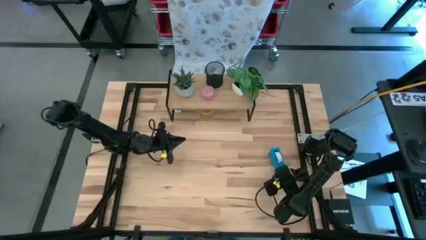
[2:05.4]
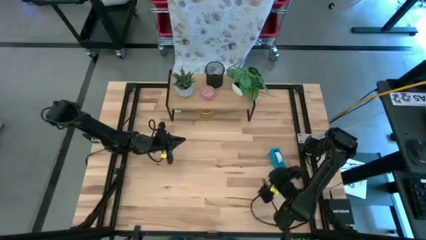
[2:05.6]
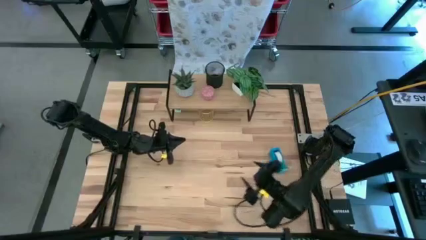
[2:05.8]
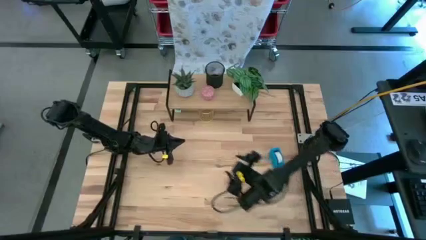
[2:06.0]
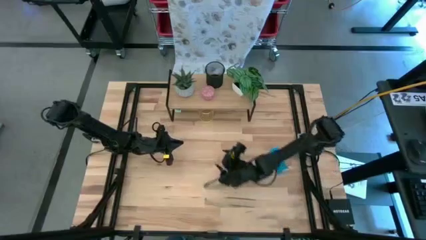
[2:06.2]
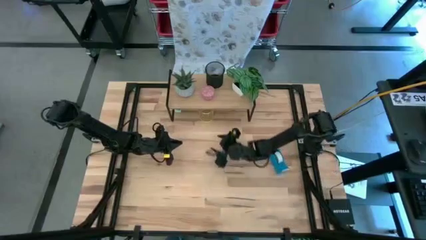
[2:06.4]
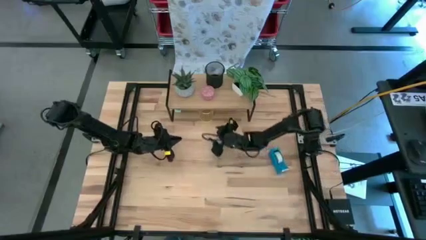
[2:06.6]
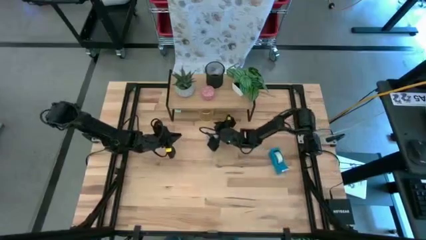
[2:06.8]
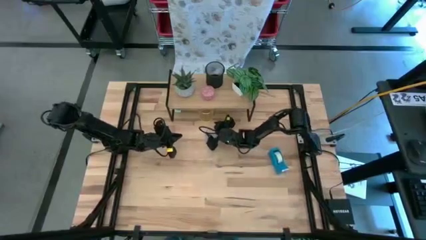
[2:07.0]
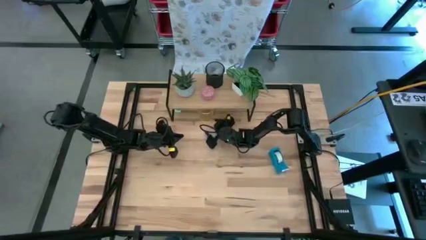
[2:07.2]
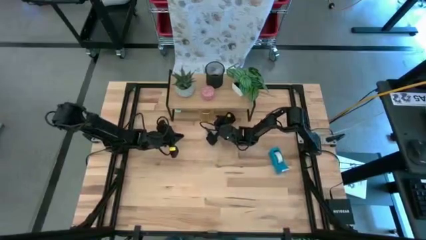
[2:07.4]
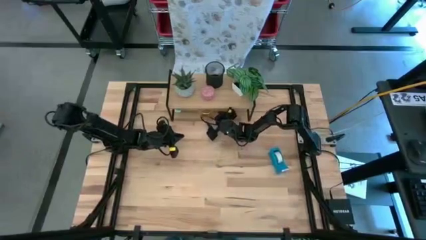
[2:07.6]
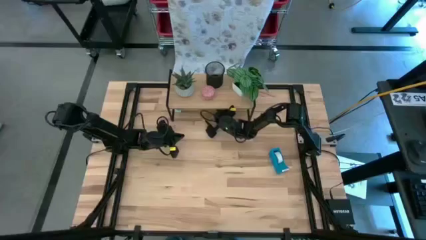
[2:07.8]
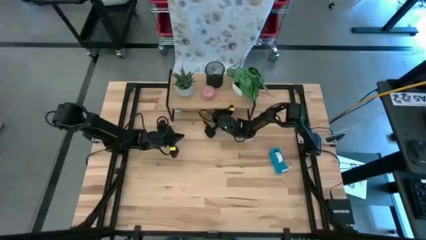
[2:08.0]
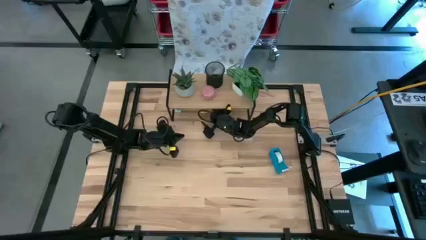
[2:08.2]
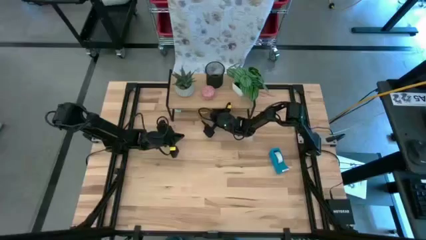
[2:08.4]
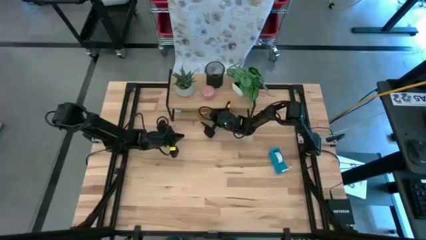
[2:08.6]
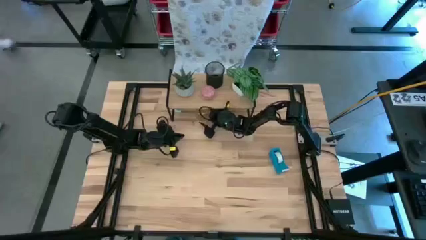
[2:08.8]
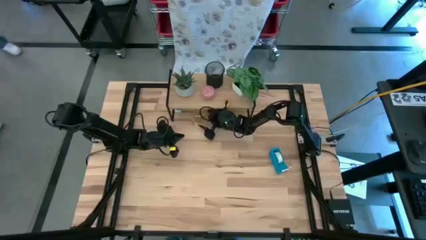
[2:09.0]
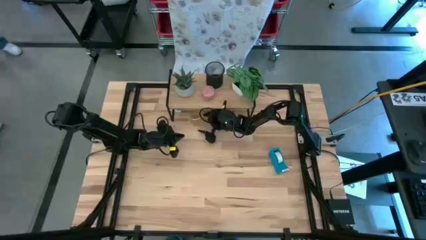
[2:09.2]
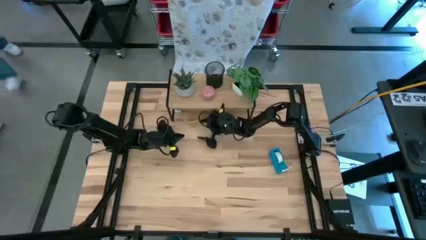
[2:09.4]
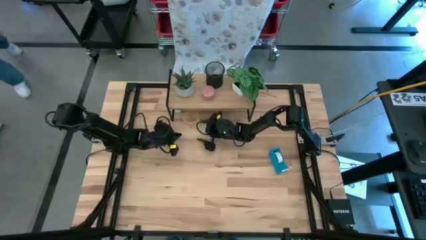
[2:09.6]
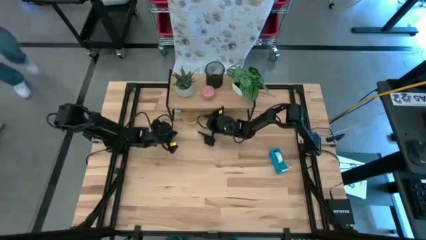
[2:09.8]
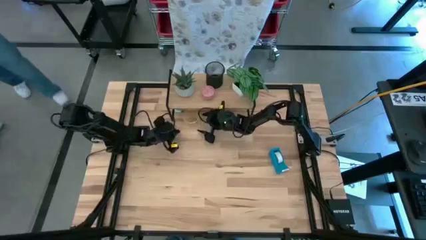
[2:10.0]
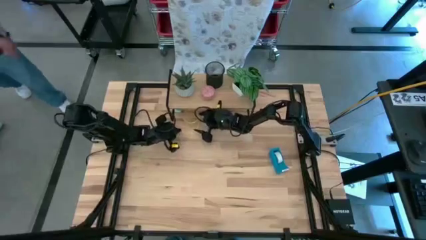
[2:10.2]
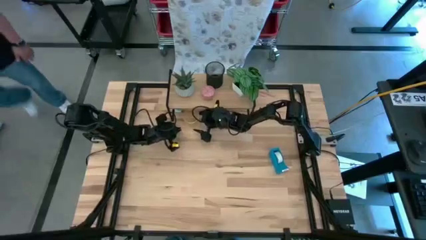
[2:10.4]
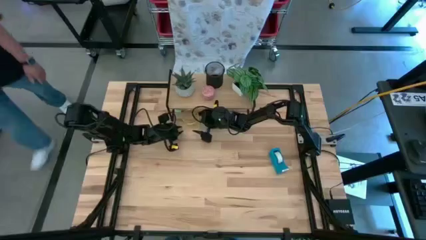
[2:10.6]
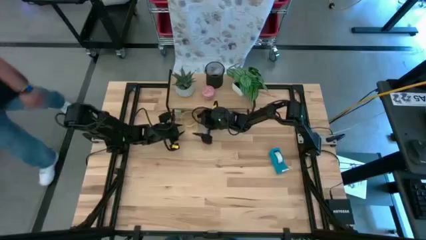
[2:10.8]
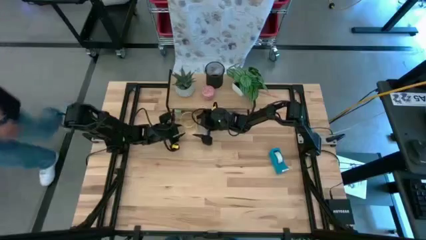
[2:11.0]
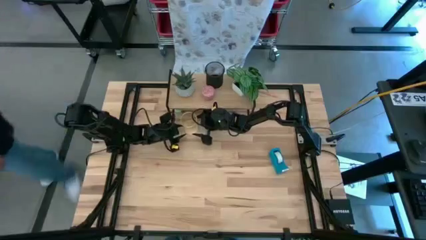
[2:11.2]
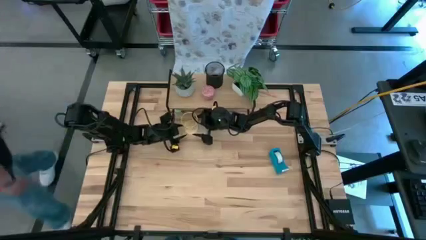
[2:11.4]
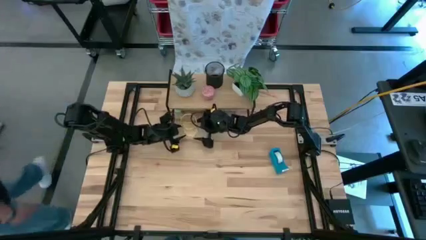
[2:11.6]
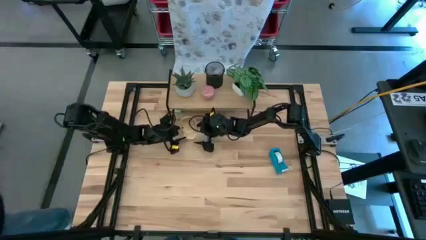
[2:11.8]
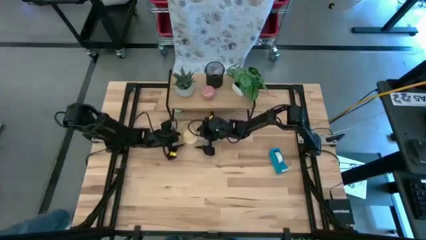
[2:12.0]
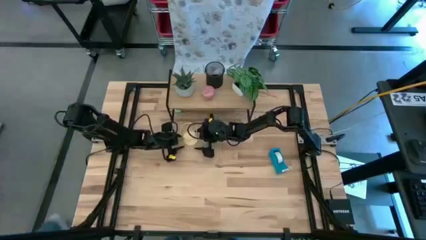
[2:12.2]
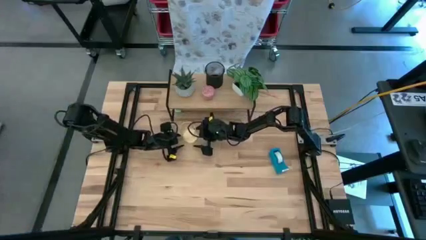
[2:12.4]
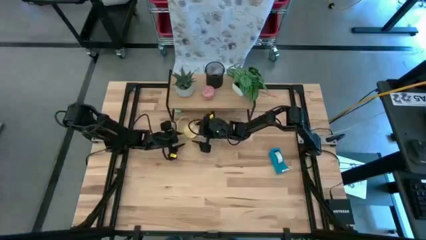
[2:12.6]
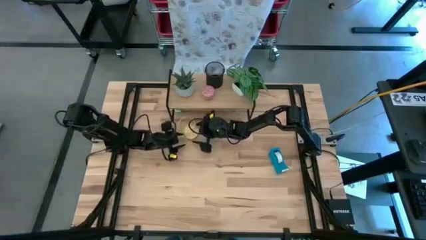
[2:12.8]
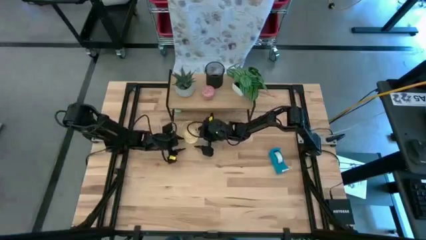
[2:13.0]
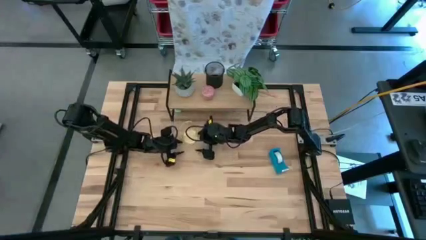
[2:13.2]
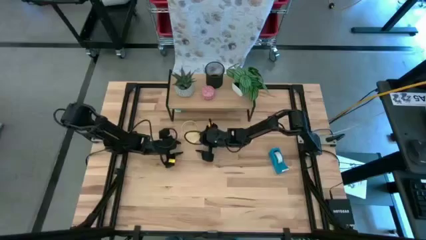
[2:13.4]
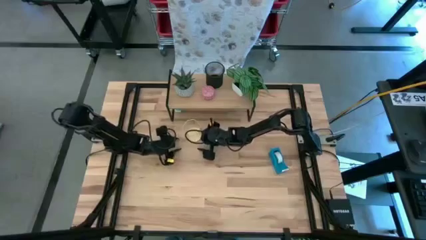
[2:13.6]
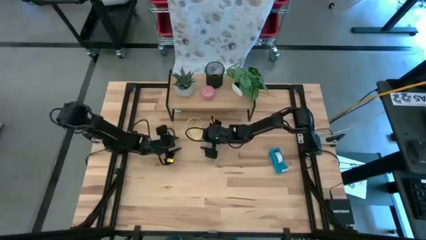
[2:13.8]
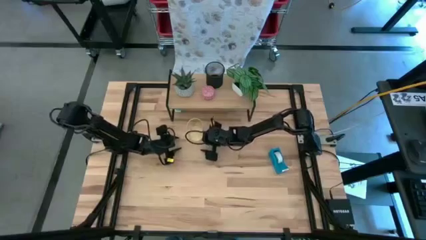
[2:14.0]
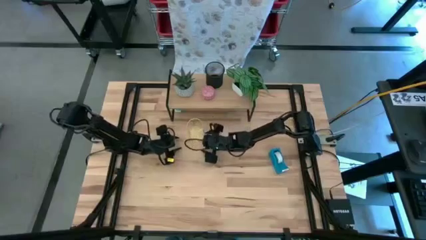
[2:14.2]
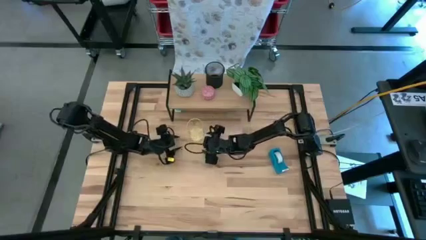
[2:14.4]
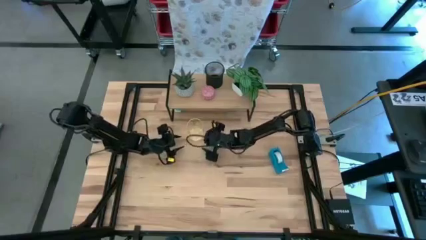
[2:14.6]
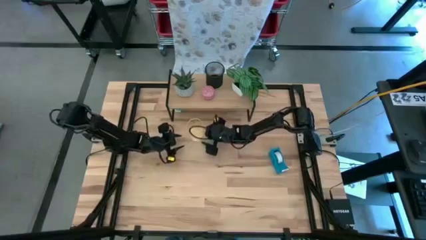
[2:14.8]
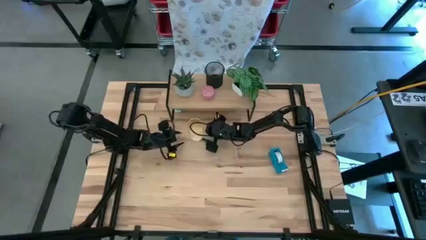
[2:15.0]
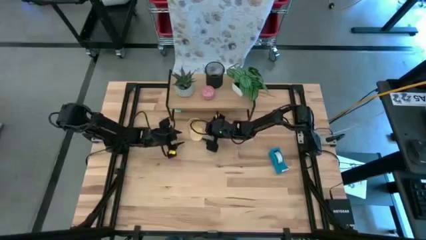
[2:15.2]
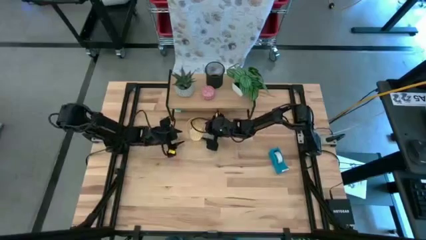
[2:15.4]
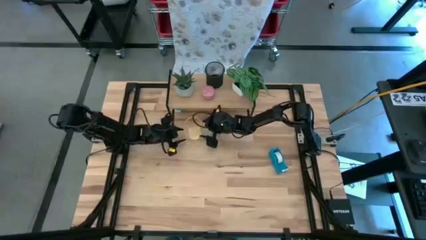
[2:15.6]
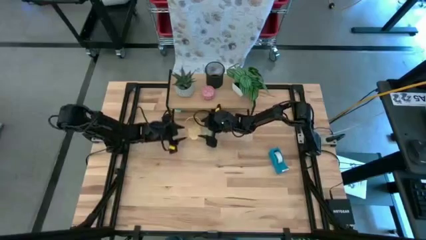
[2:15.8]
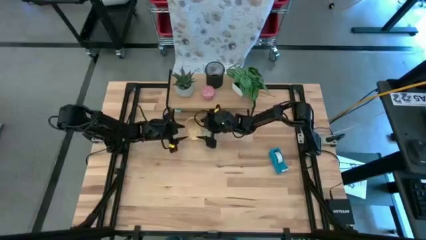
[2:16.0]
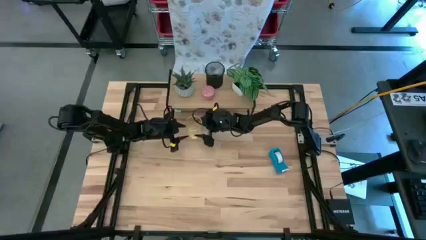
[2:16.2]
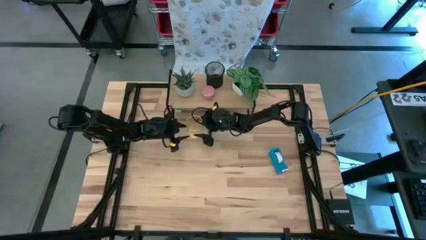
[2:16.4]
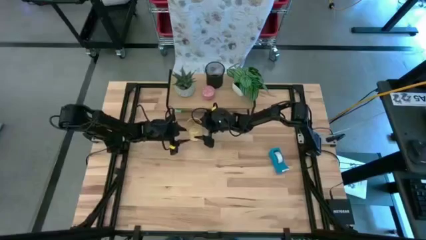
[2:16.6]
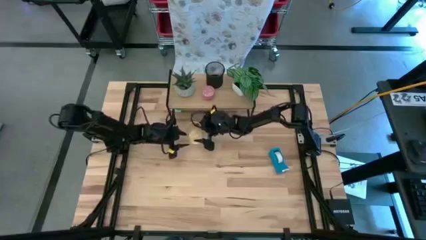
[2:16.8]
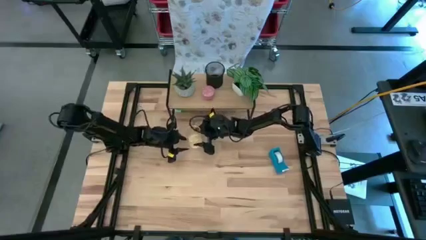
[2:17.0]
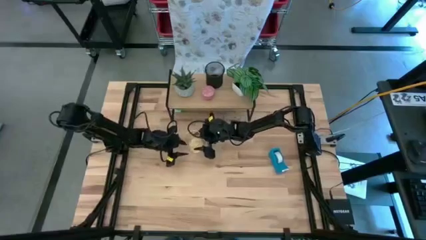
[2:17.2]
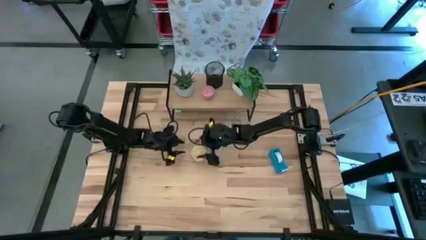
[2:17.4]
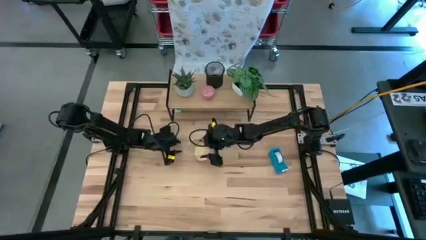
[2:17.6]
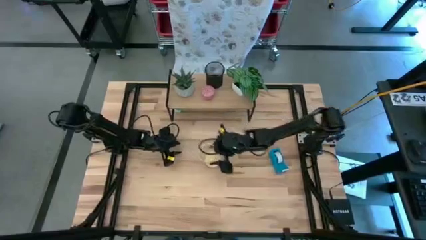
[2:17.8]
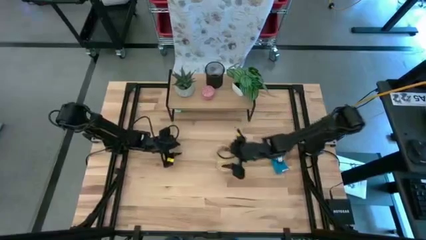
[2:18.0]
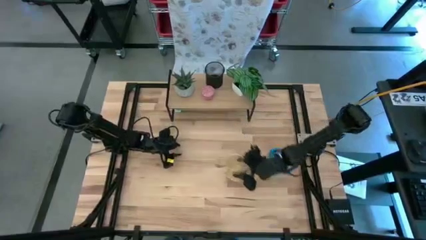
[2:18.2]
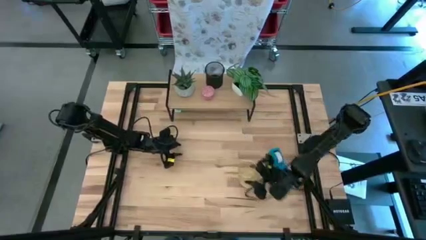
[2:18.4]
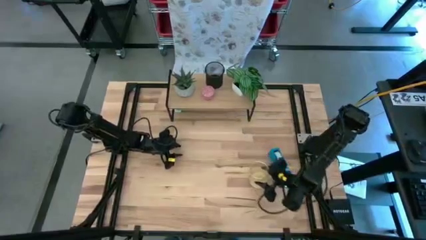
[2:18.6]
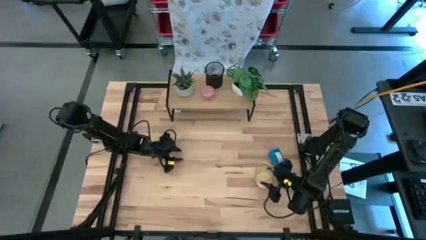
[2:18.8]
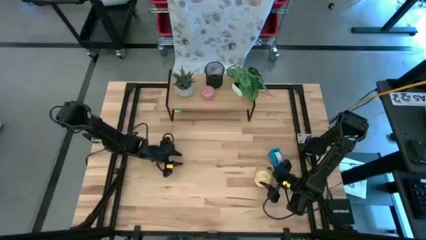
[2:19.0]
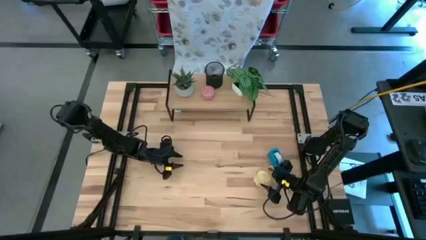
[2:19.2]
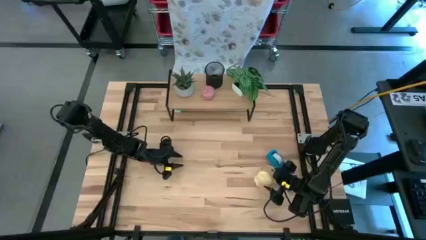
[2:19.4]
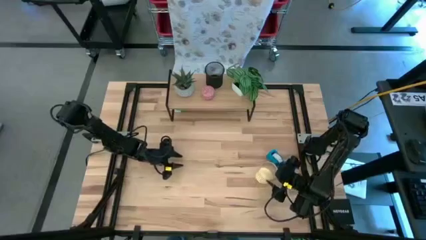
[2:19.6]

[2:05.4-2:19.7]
Task: Stock shelves
Remove the gold pen holder under the shelf
